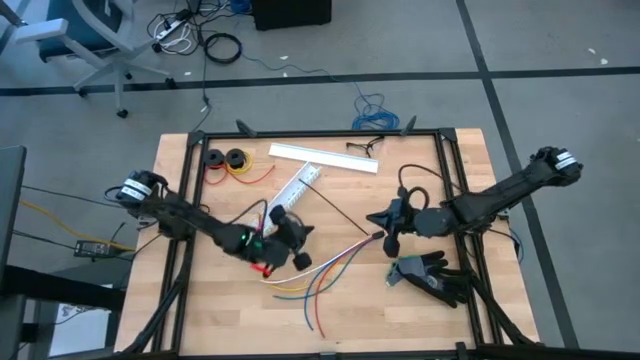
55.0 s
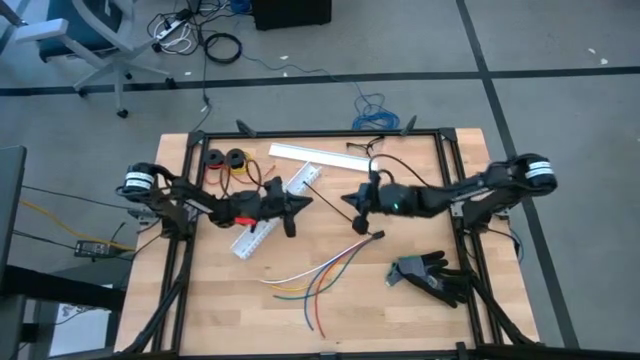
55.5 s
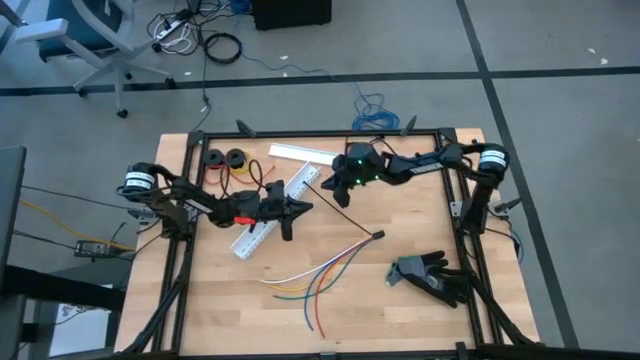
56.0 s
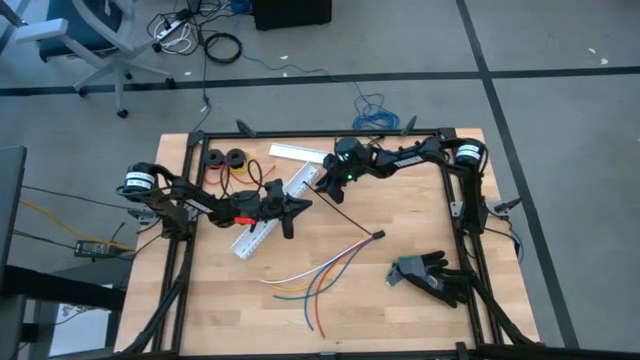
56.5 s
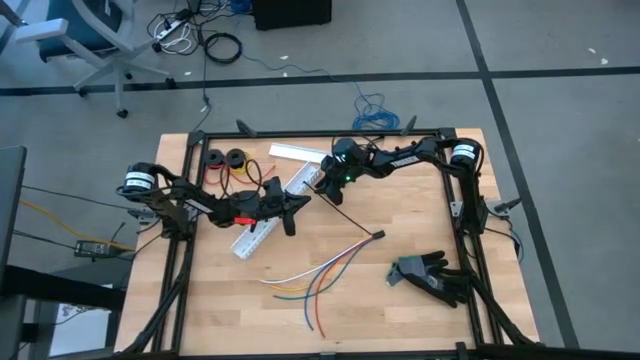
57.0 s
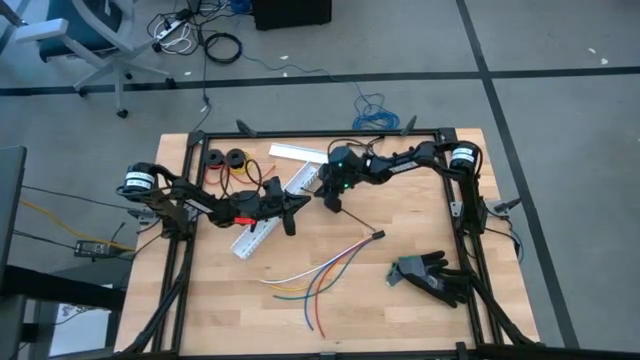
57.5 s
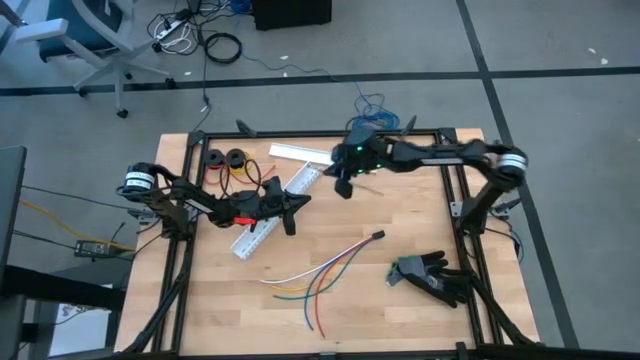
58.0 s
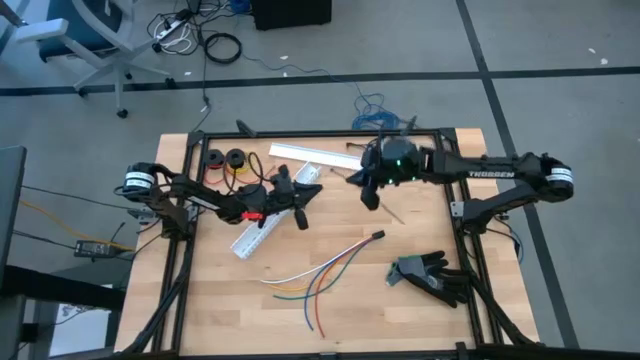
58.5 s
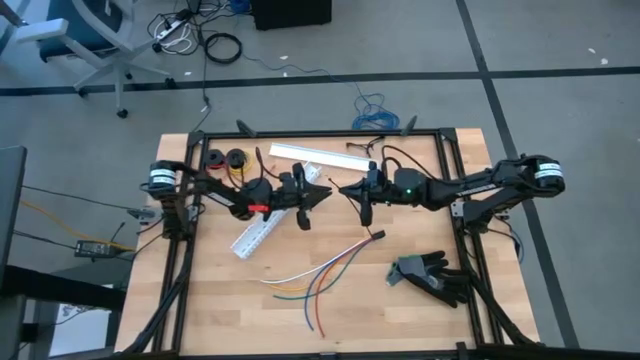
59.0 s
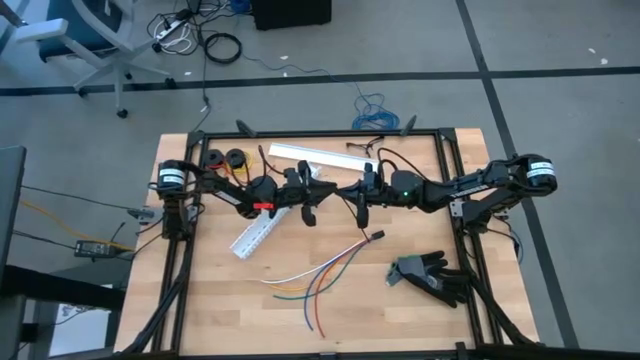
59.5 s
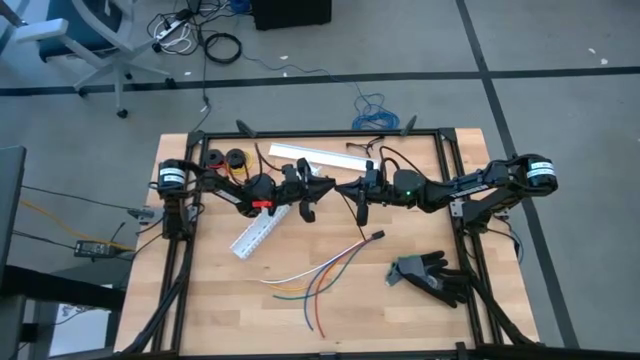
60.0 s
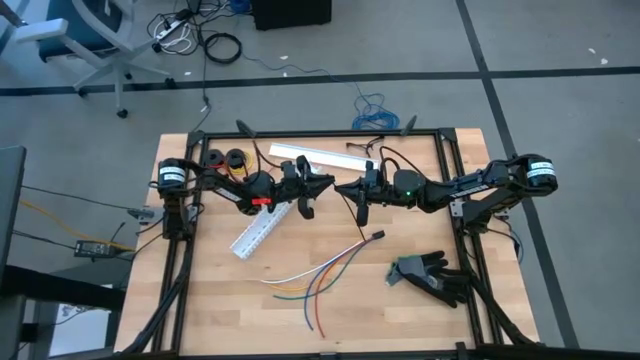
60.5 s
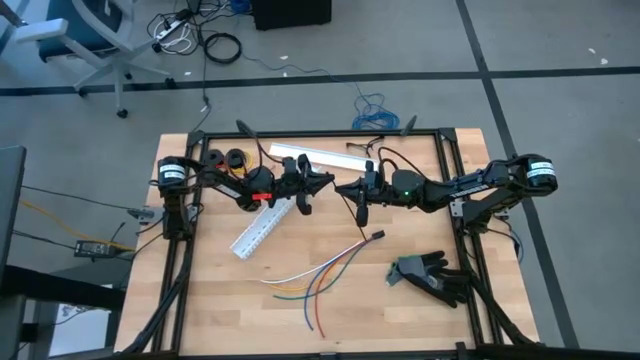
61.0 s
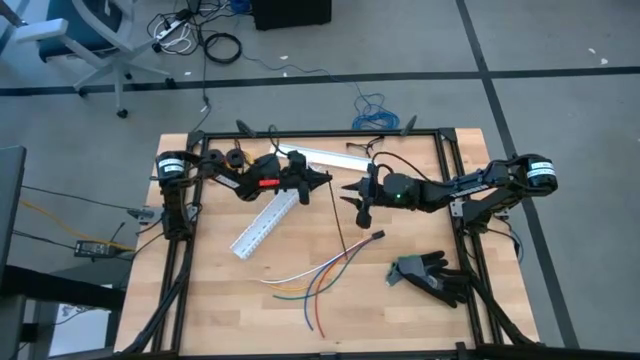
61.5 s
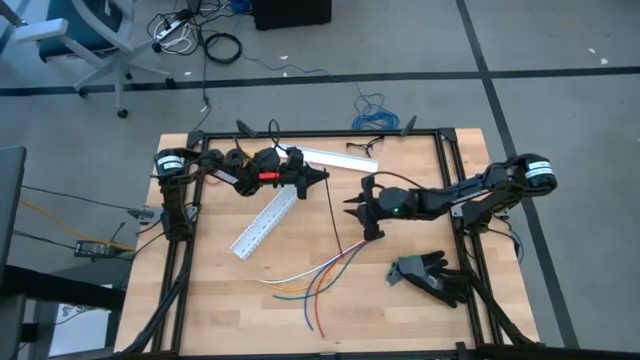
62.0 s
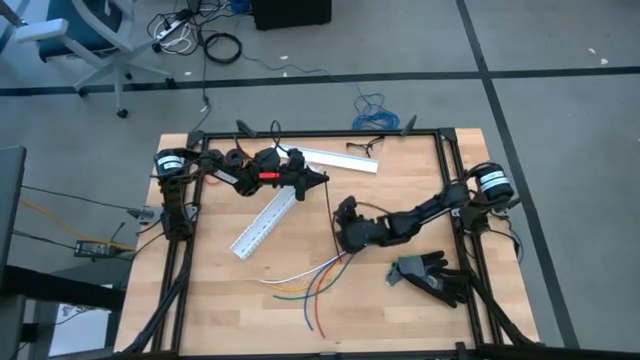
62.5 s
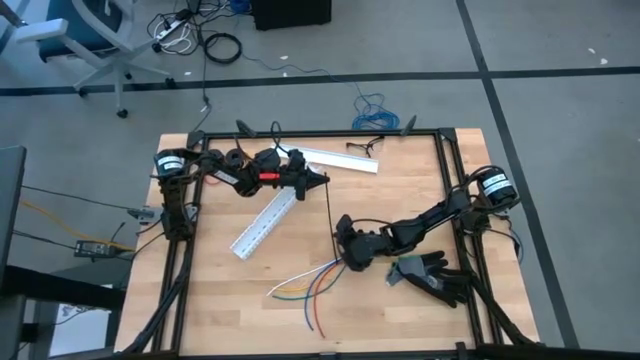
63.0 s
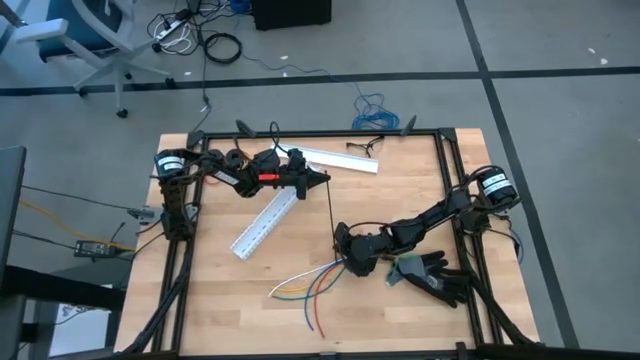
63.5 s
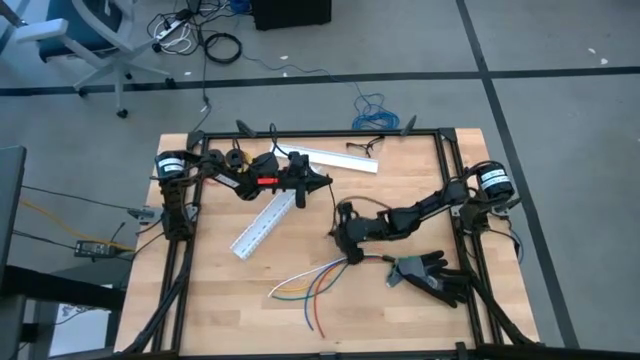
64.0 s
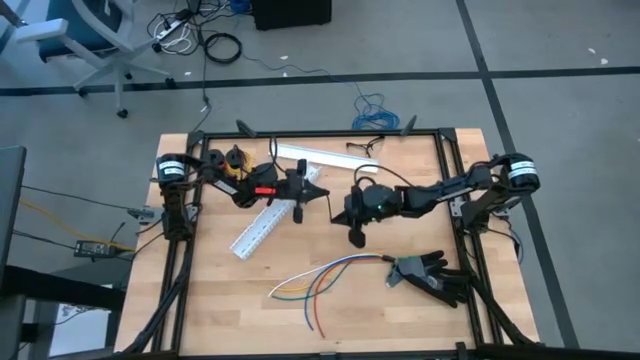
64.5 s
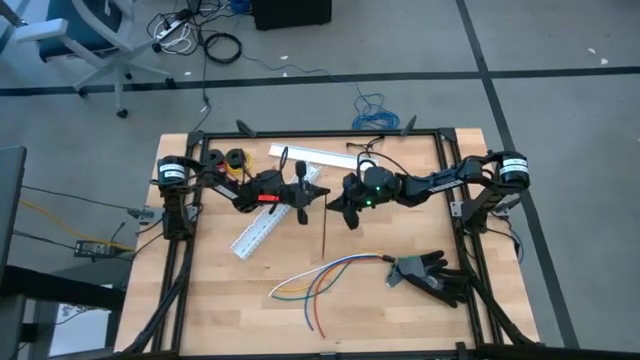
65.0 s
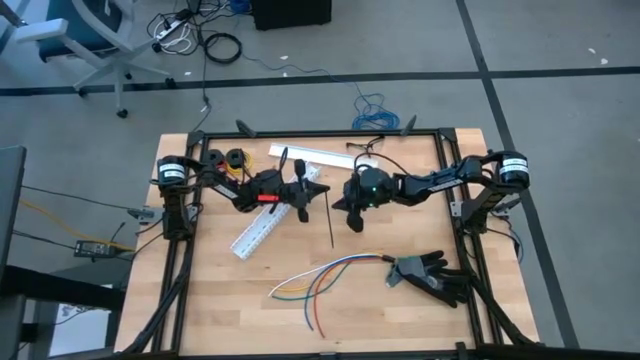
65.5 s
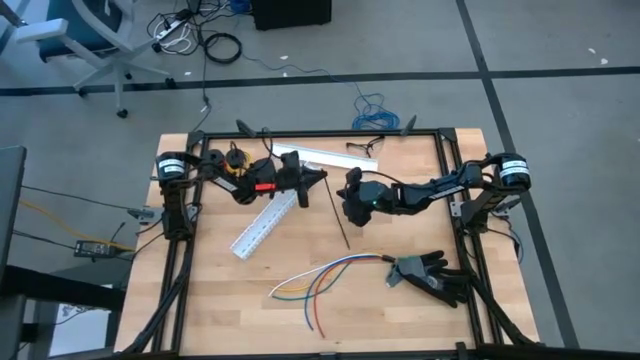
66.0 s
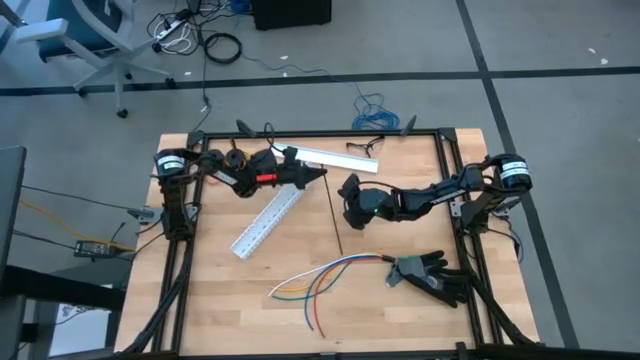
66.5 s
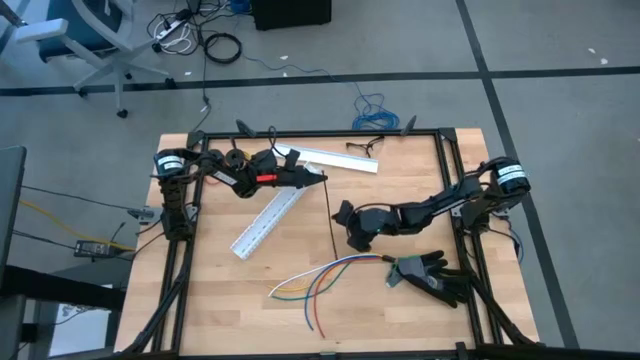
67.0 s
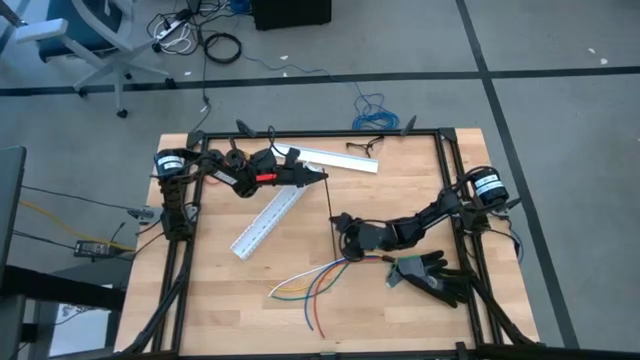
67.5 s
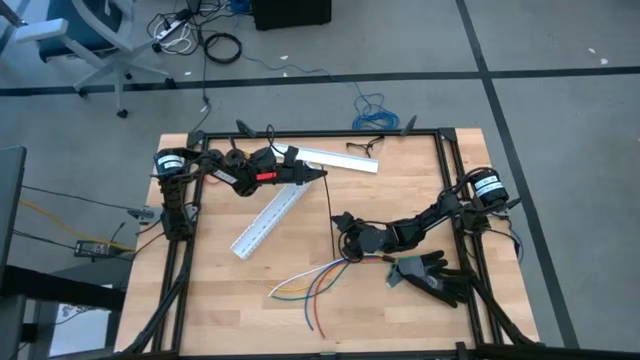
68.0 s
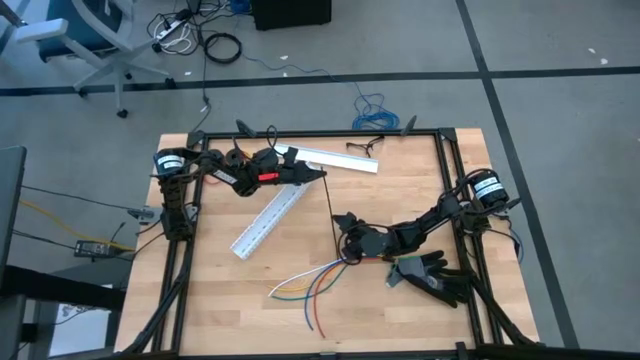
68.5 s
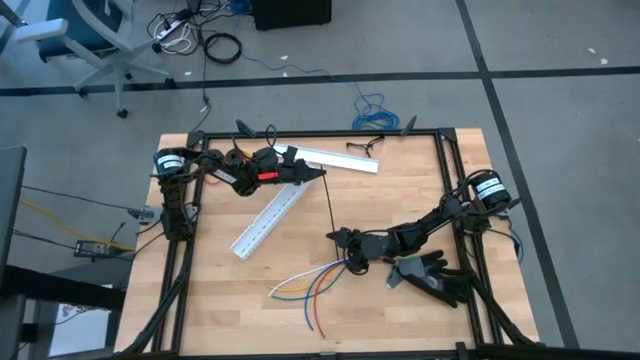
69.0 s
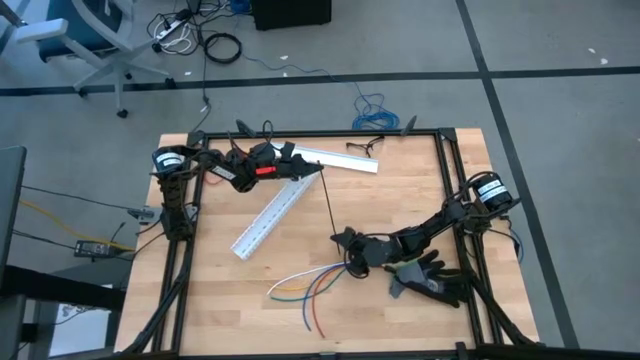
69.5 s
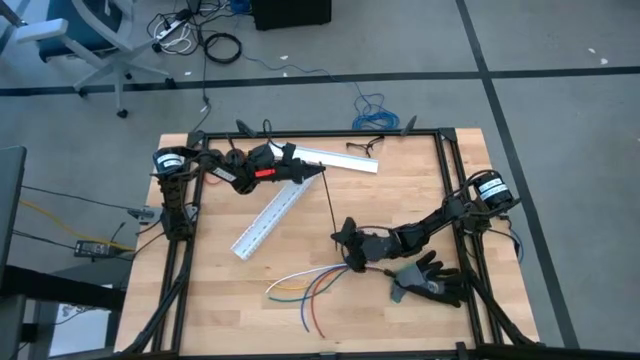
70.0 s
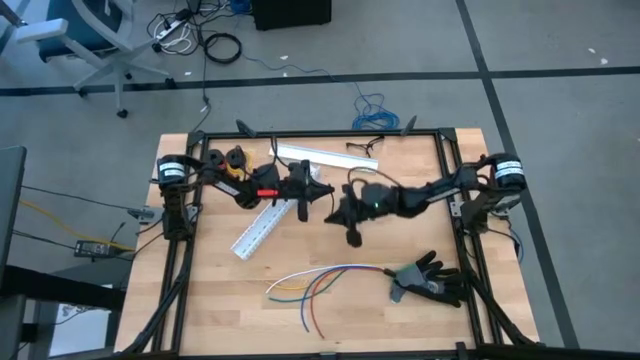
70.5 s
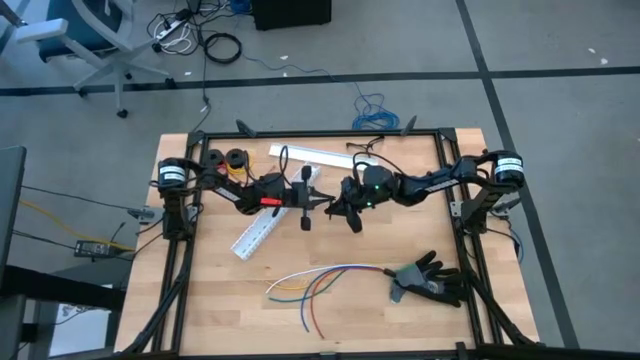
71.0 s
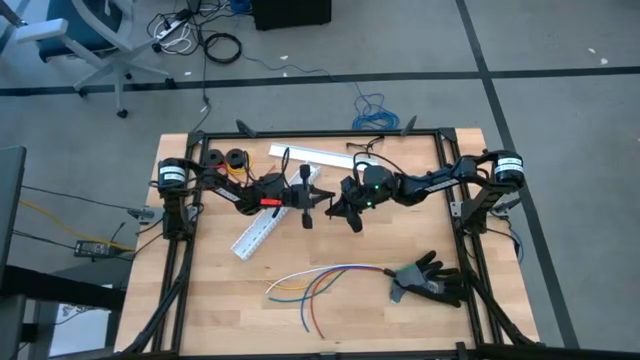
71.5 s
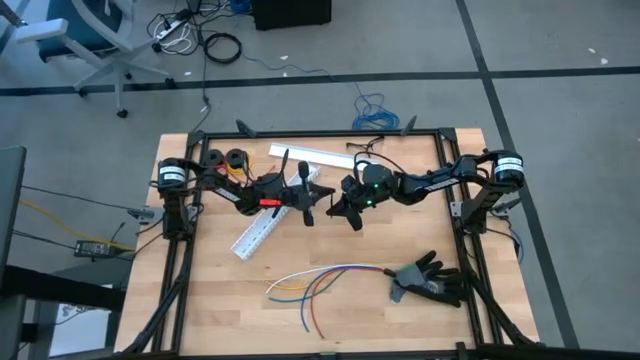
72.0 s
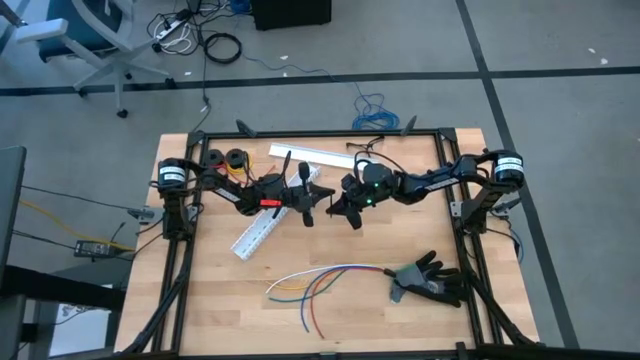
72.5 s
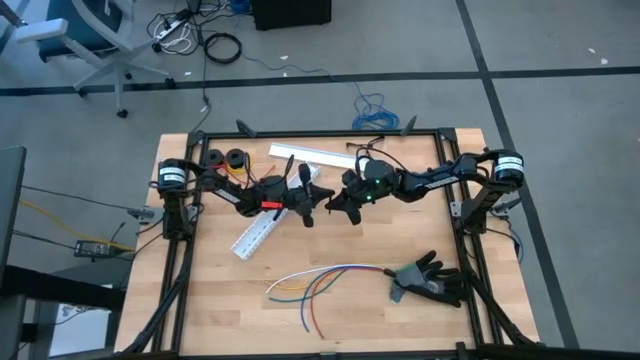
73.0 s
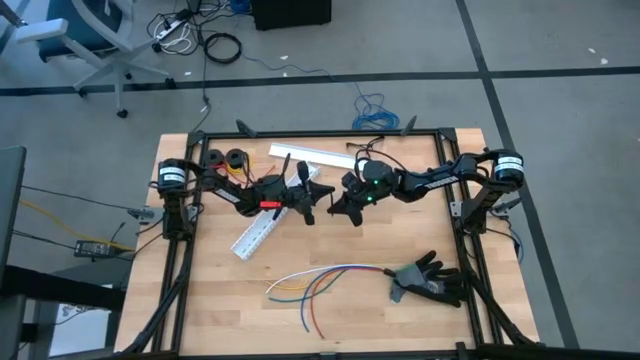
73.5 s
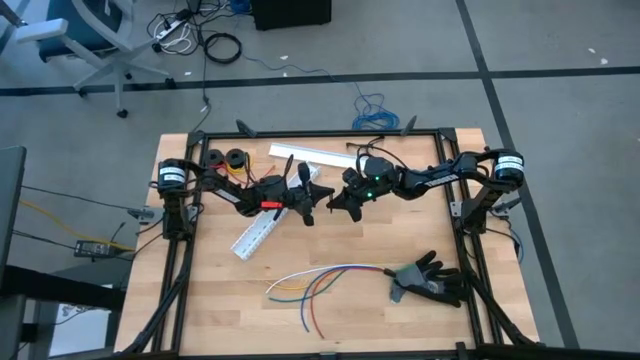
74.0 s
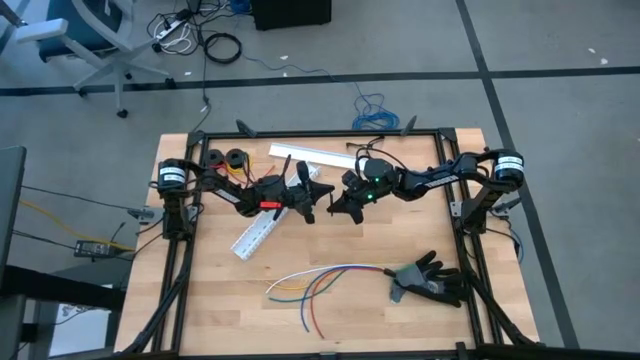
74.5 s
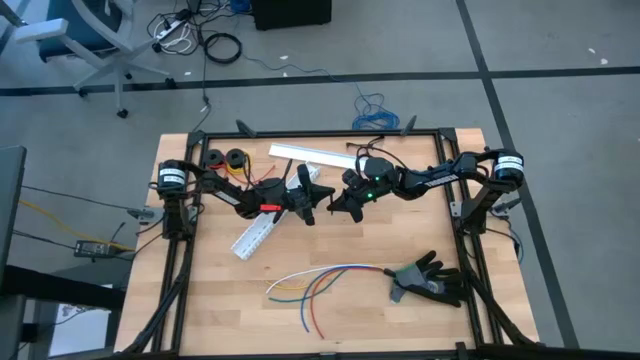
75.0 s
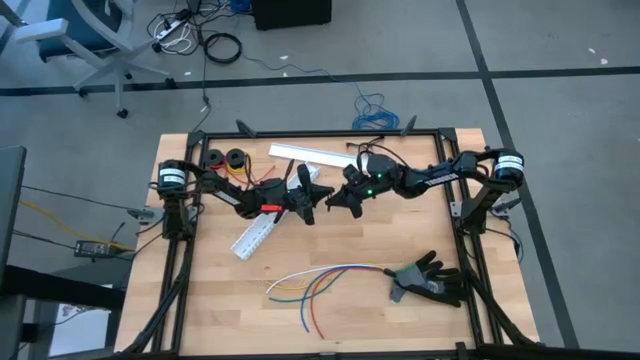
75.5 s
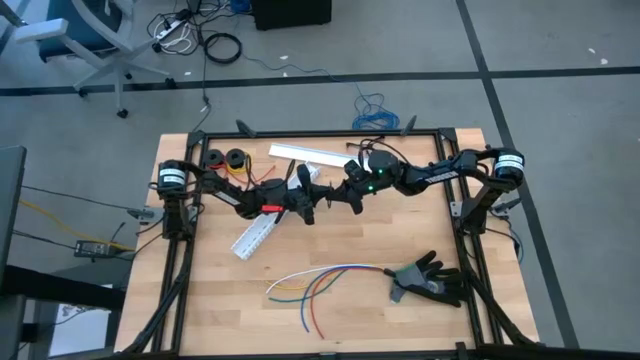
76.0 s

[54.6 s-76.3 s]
Task: Ziptie cables
Wrap the black zip tie on the cables
